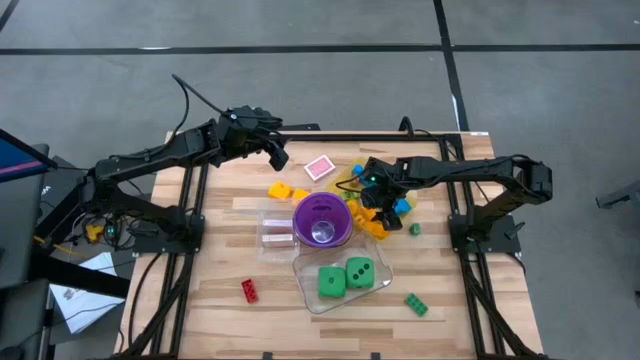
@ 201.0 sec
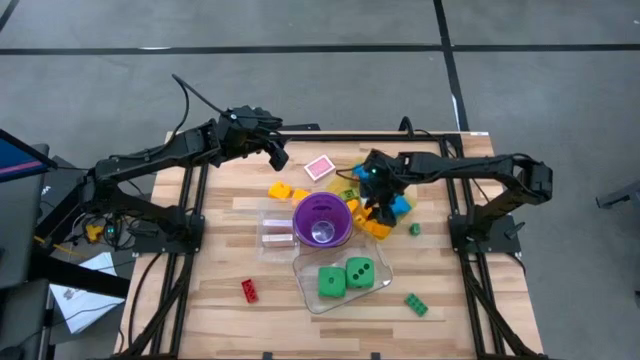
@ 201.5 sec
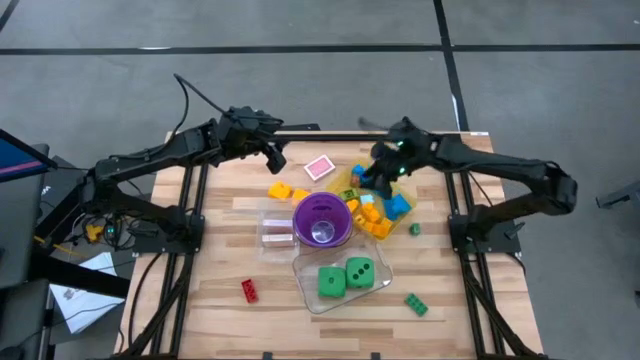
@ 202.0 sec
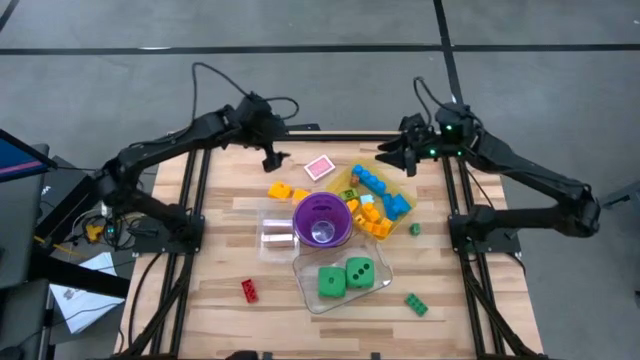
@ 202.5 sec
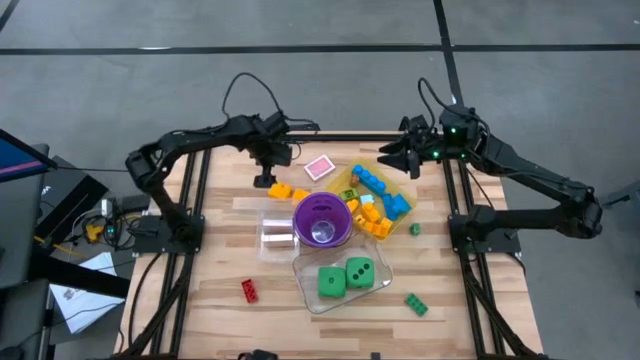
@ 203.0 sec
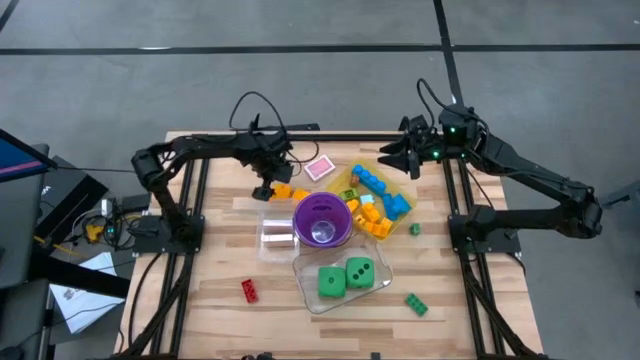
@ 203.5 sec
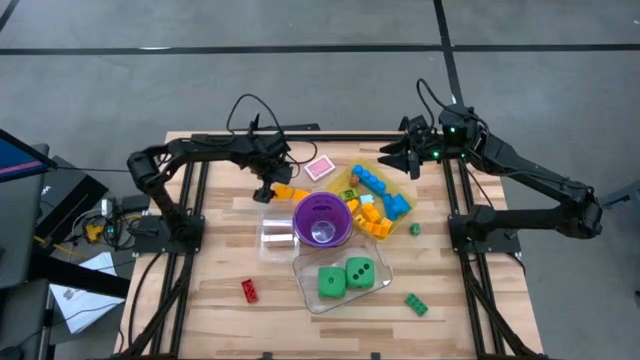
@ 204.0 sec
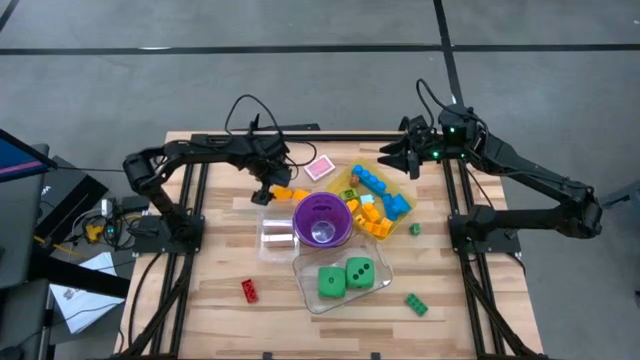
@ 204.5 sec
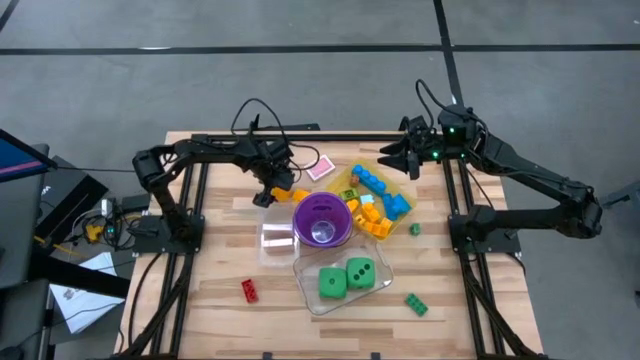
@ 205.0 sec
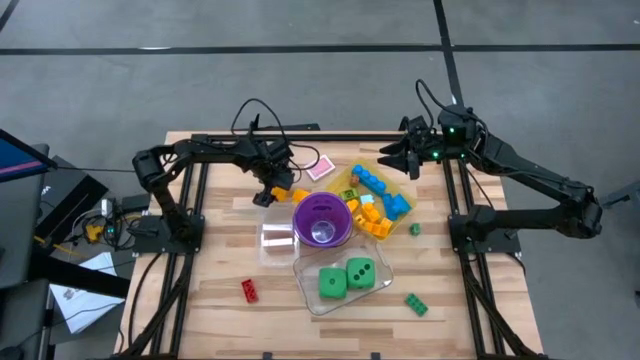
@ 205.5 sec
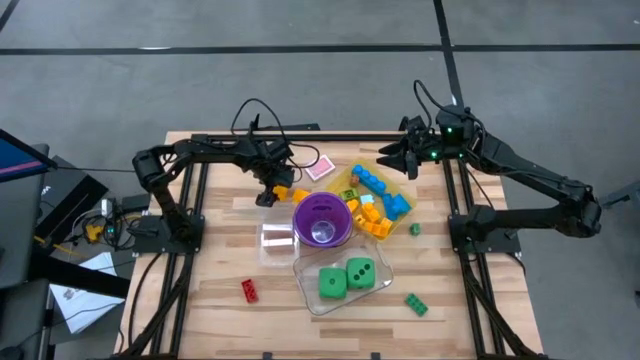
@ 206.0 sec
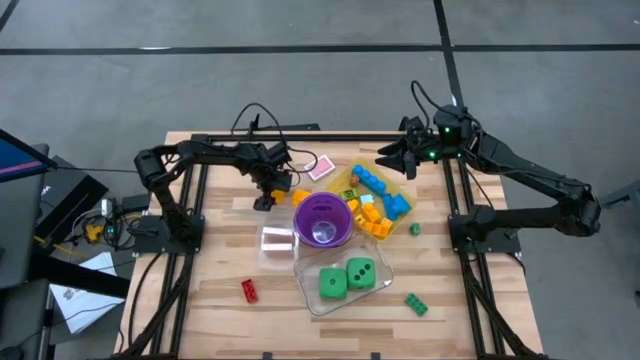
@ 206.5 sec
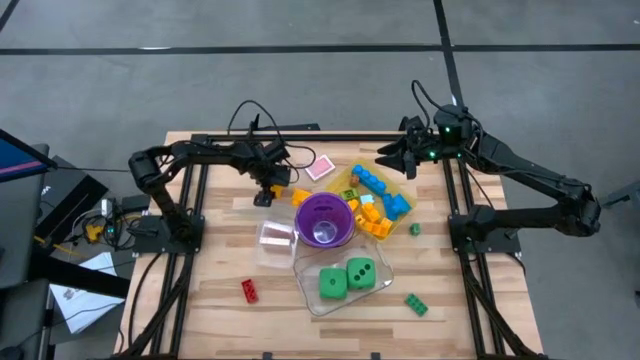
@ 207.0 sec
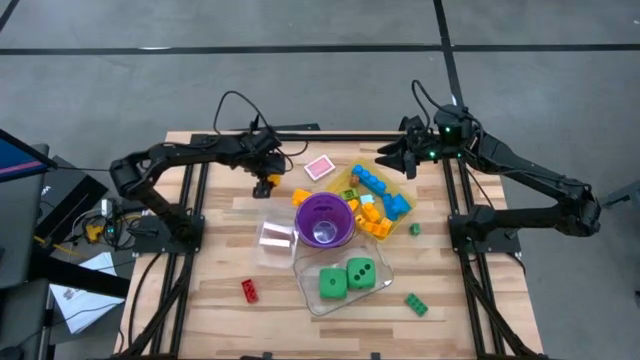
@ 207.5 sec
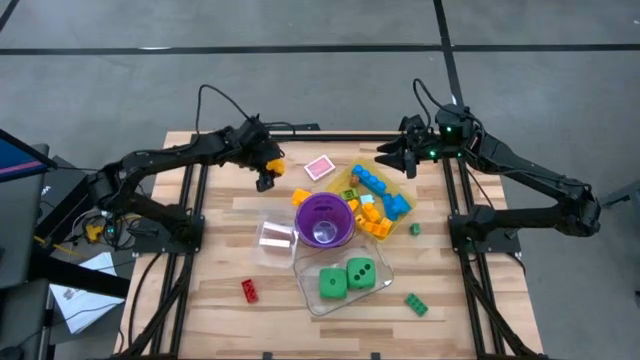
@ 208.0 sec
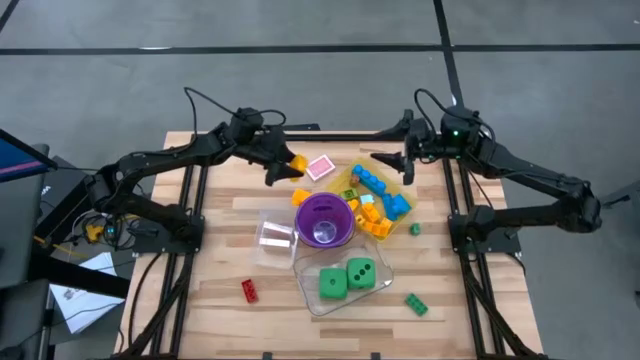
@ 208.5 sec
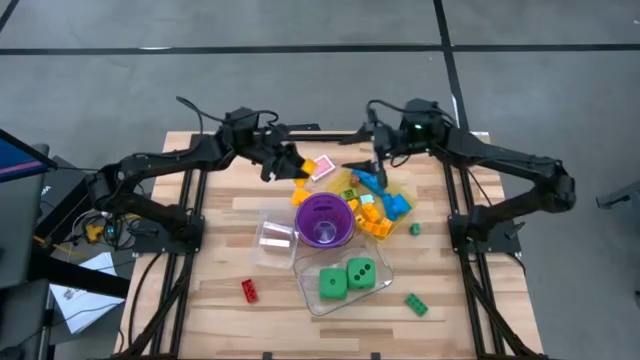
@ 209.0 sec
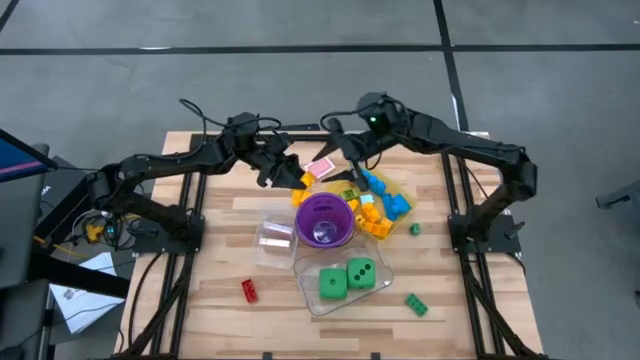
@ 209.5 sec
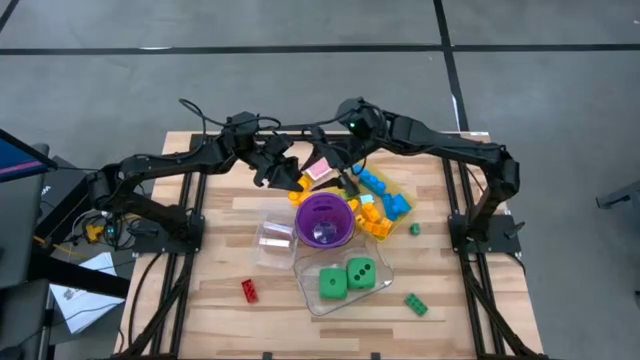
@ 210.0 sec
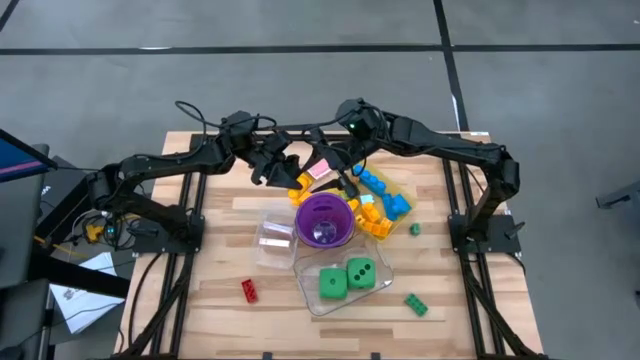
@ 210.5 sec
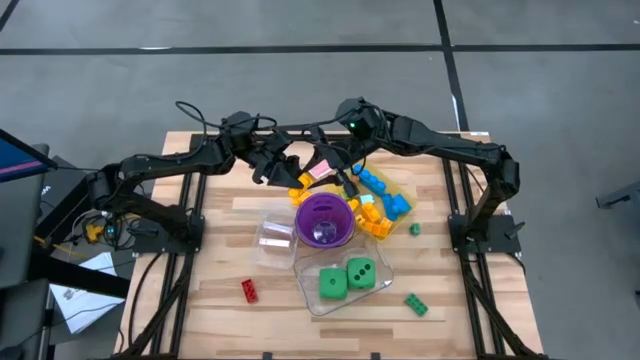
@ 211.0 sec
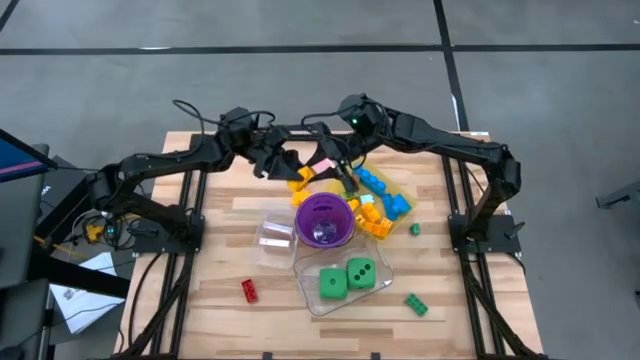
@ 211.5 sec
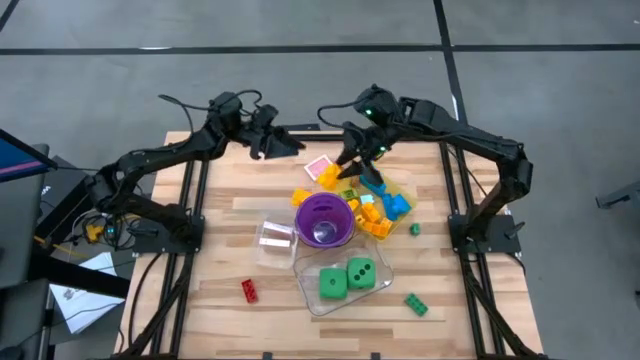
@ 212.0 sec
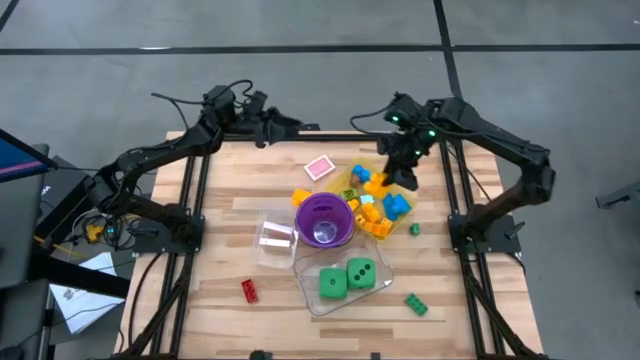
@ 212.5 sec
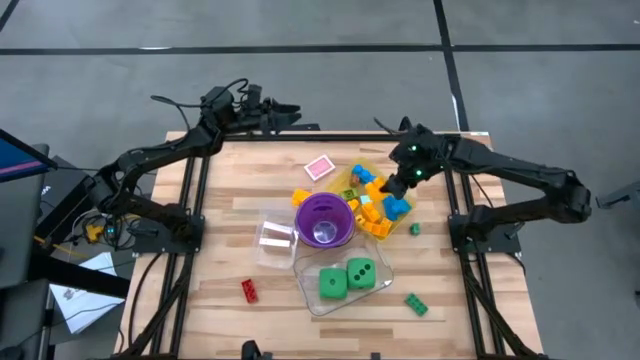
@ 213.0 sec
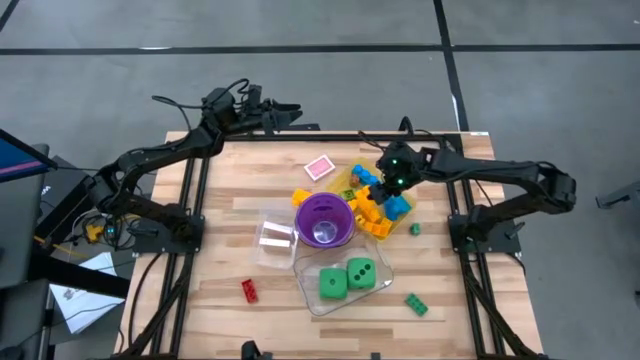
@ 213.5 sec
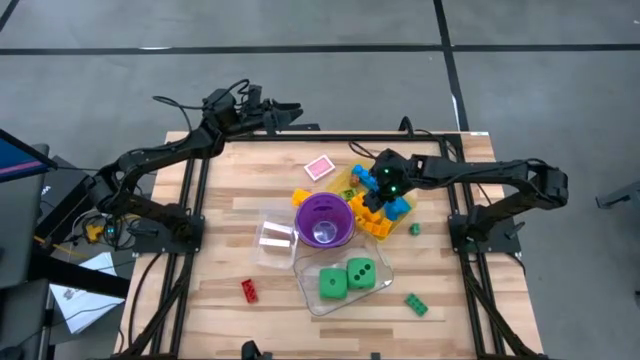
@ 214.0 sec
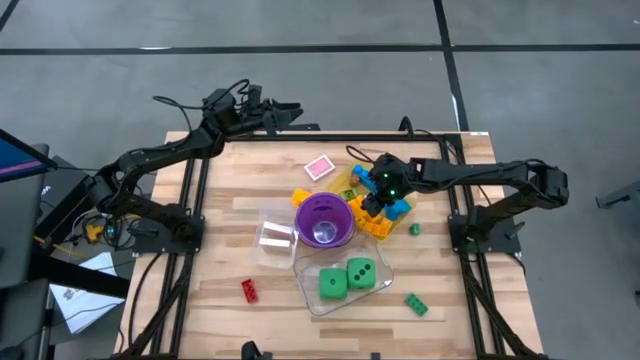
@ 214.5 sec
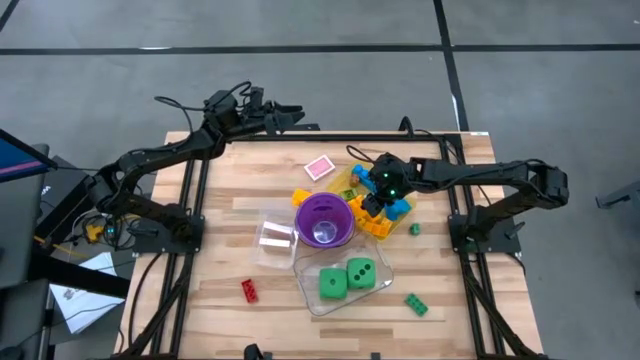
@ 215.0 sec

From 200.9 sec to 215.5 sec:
Task: Pick & Place Toys
Put the large yellow game piece into the yellow bin

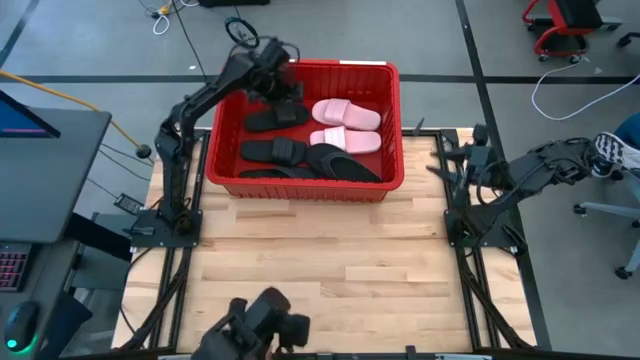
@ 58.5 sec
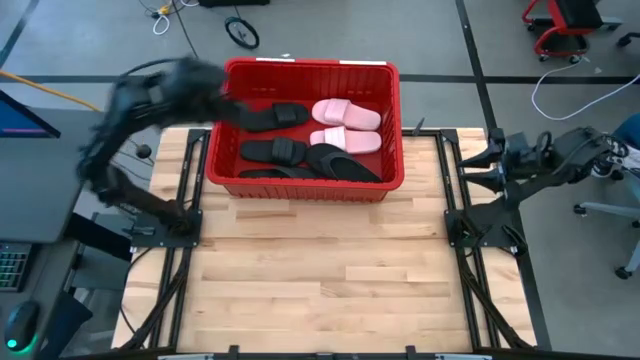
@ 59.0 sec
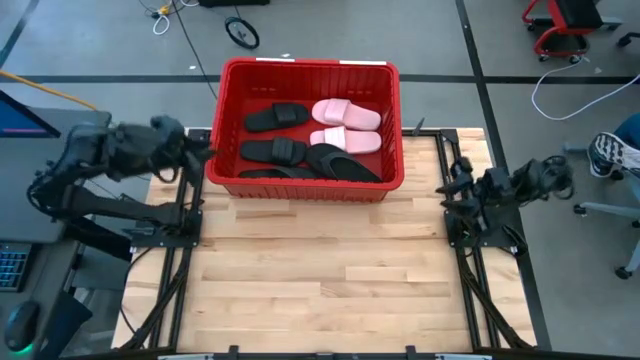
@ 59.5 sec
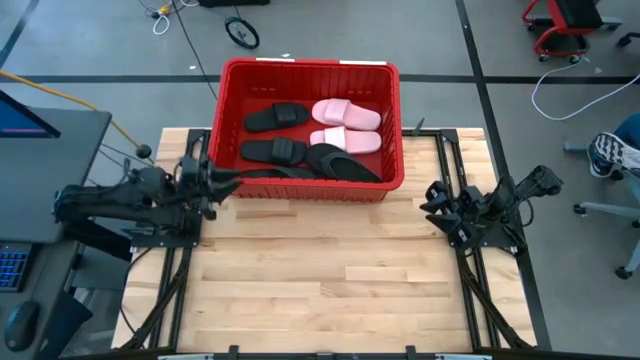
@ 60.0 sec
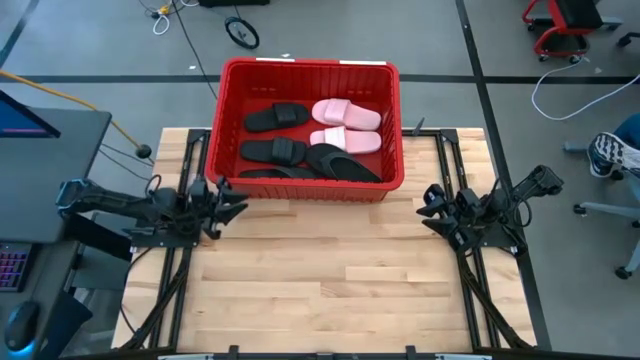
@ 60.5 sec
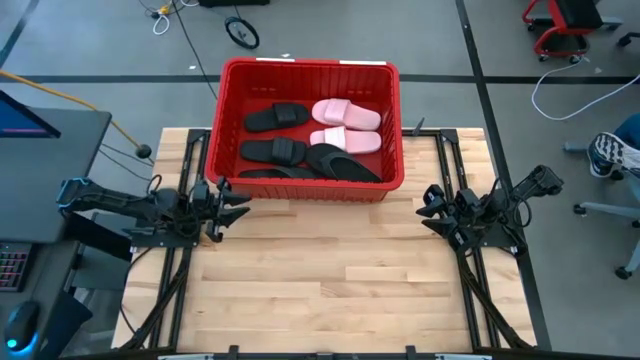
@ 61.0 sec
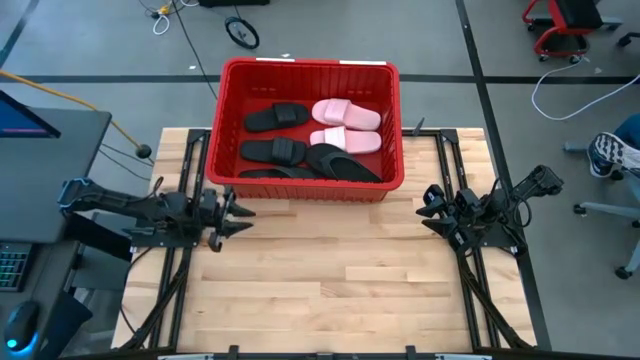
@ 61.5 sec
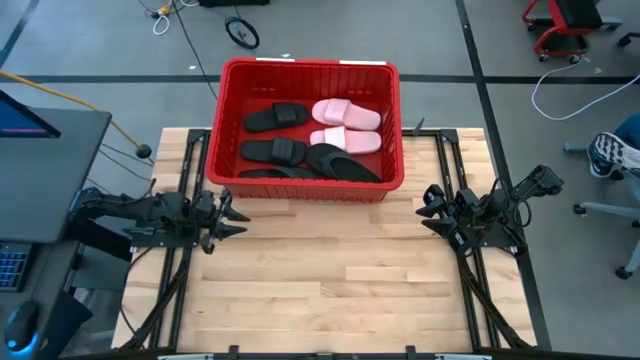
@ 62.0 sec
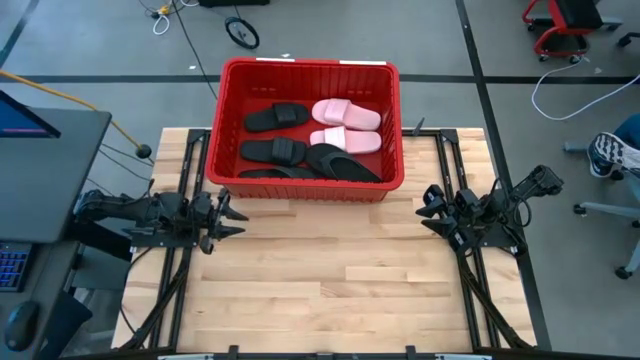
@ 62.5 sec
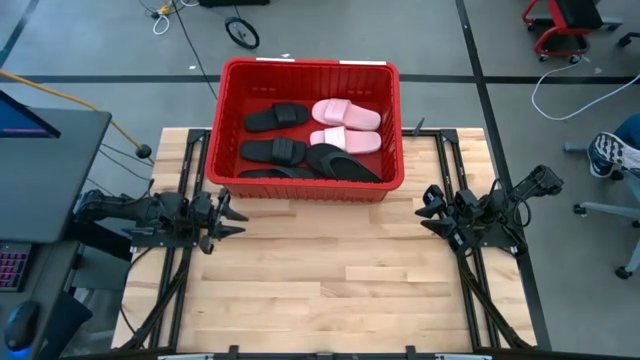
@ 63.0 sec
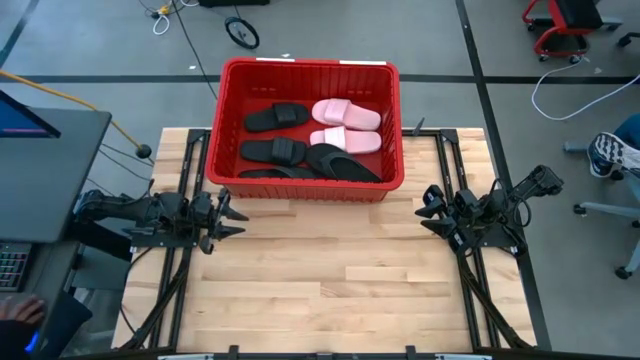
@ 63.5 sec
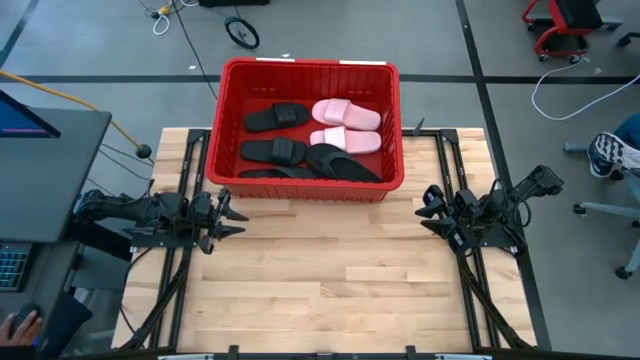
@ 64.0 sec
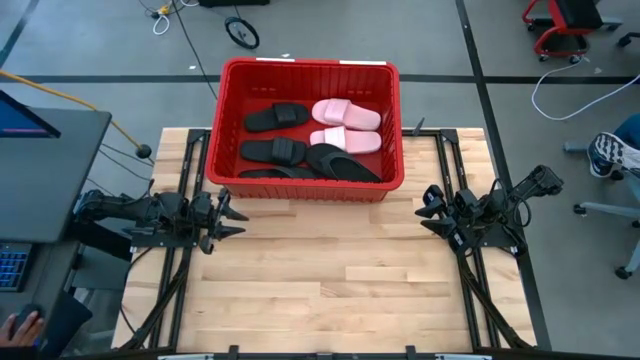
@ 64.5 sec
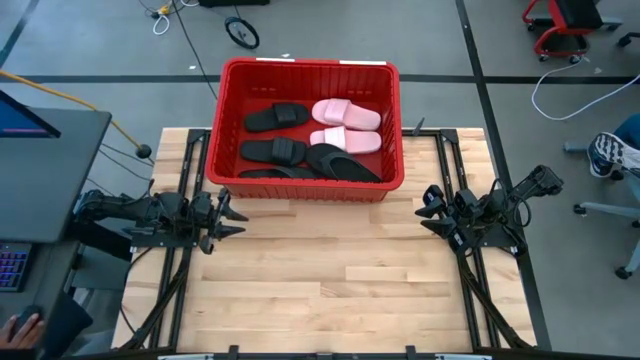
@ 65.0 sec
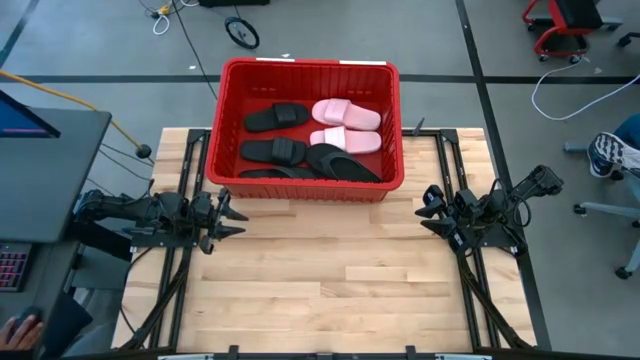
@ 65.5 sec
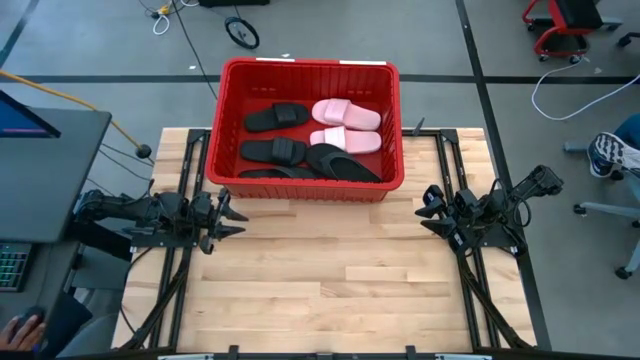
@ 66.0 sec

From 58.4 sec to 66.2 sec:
Task: Pick and place slides into bin
Return to Home Position
